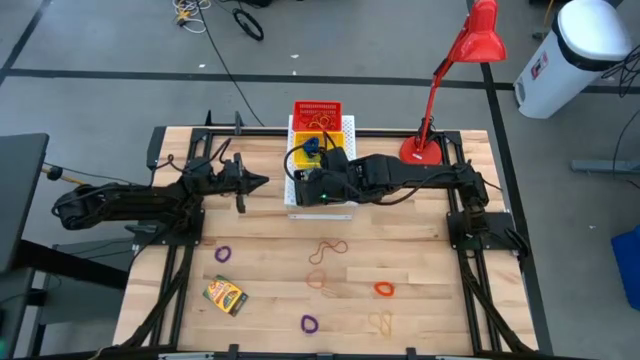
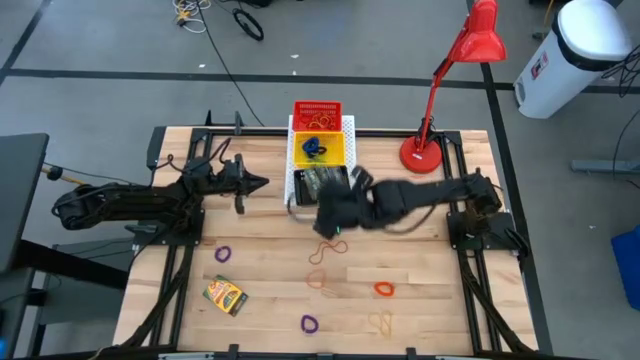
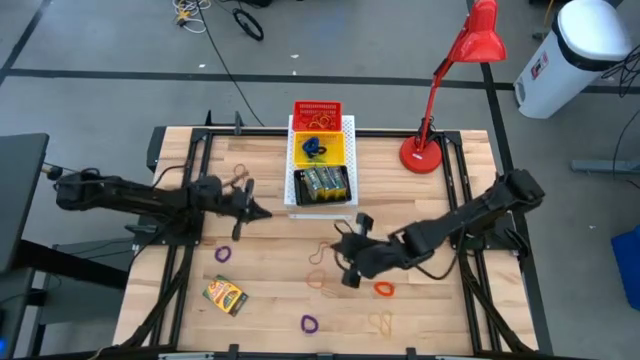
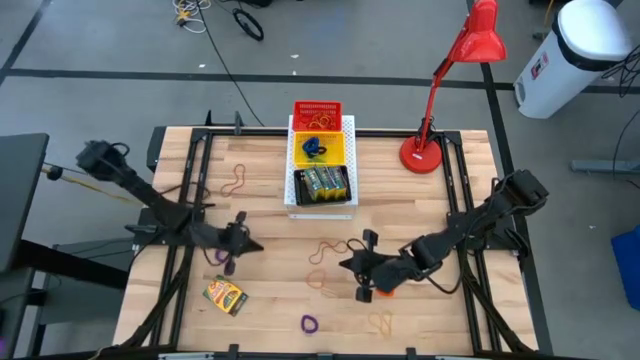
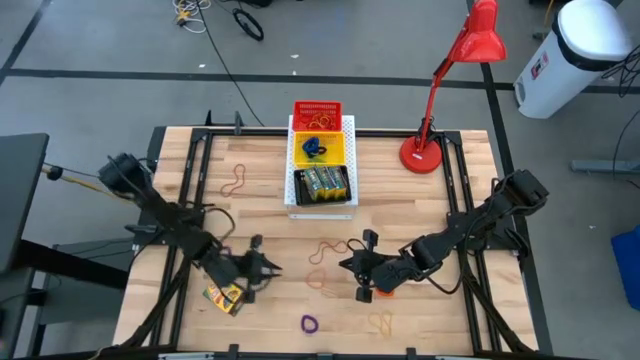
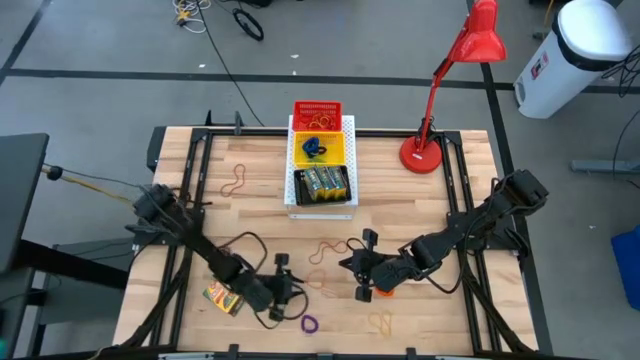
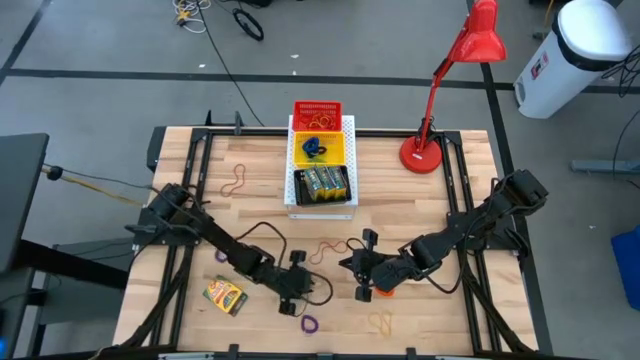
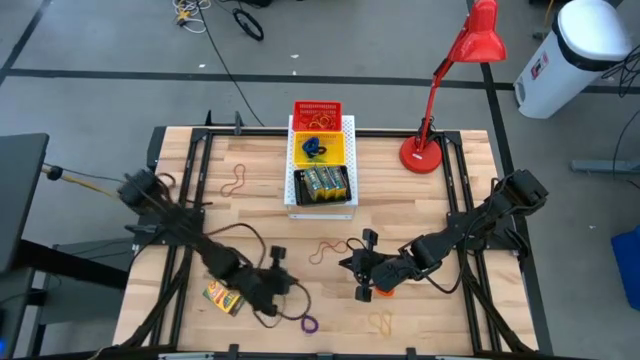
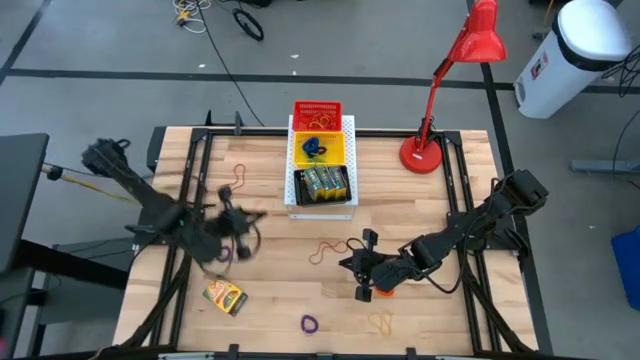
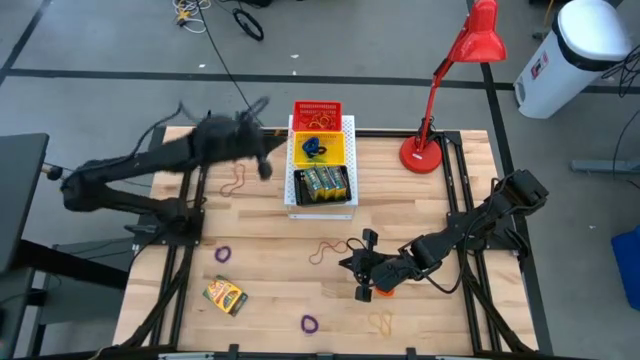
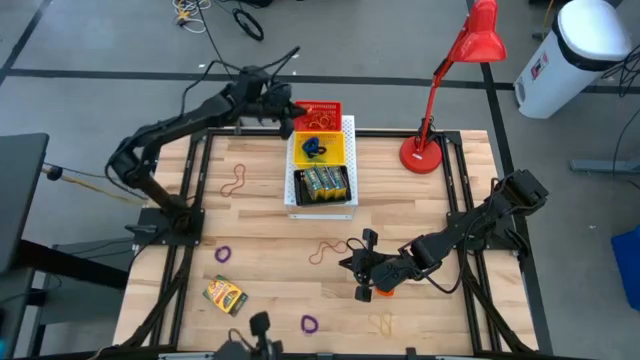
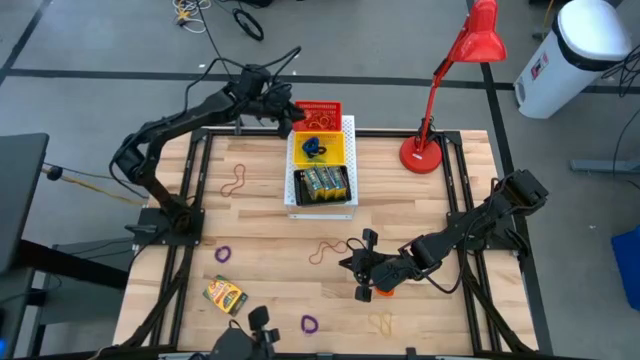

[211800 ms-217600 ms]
Task: Pick & Place Office Desk Supplies
Put the orange rubber band into the red bin on the shelf

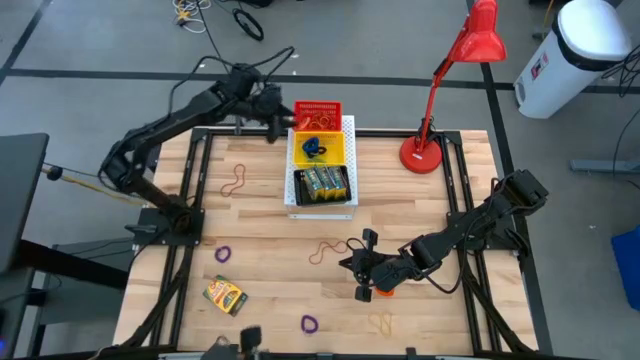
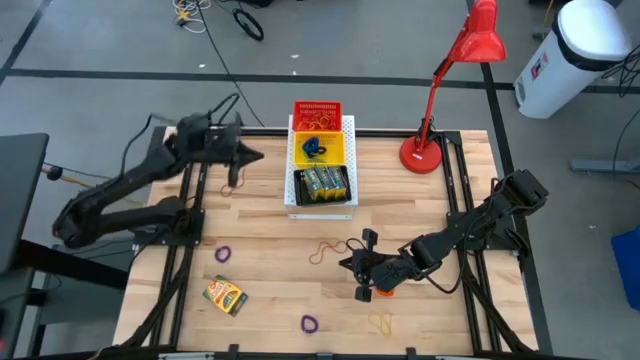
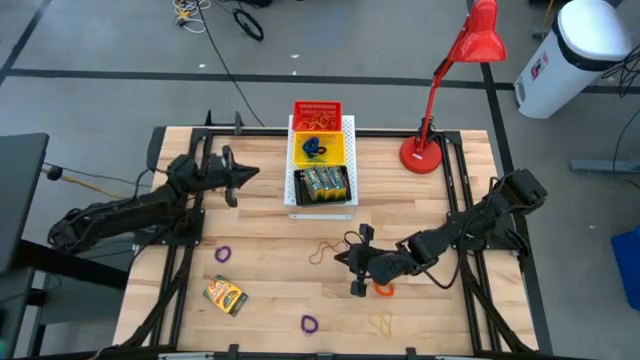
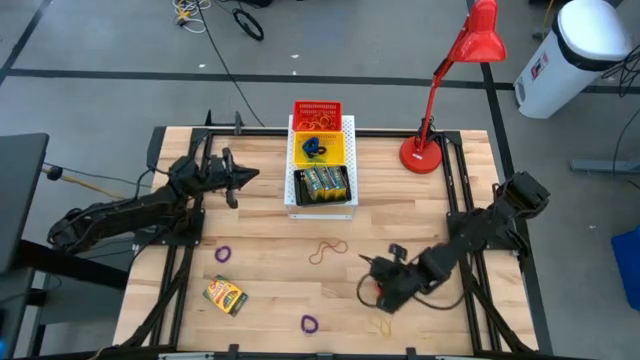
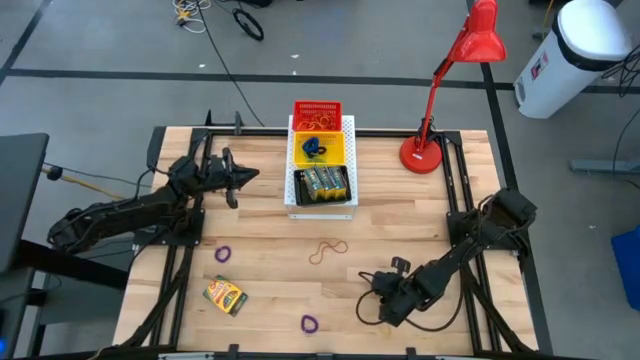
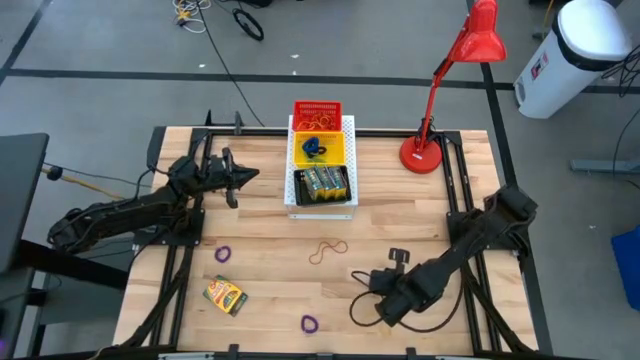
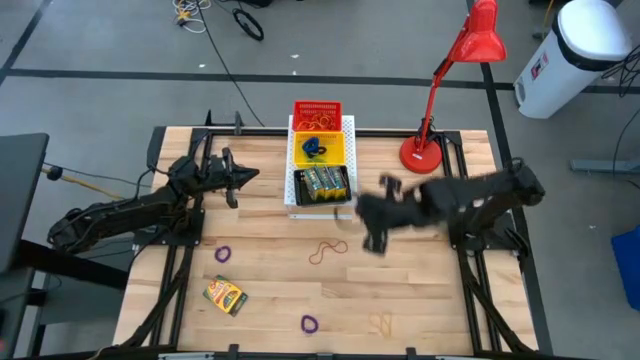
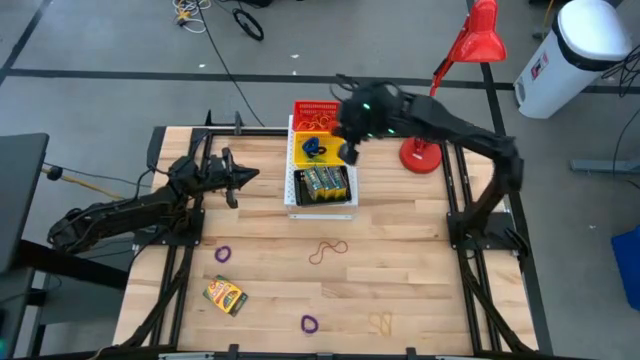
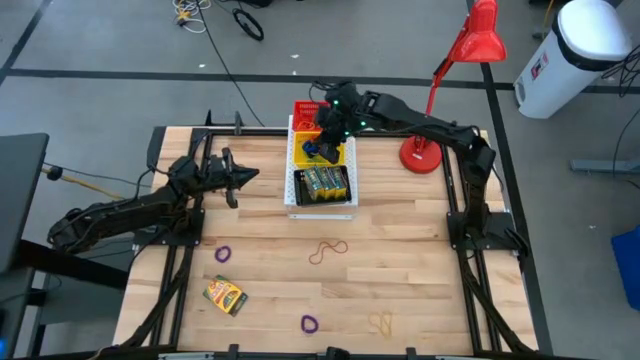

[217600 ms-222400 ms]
Put the orange spring keychain into the yellow bin on the shelf

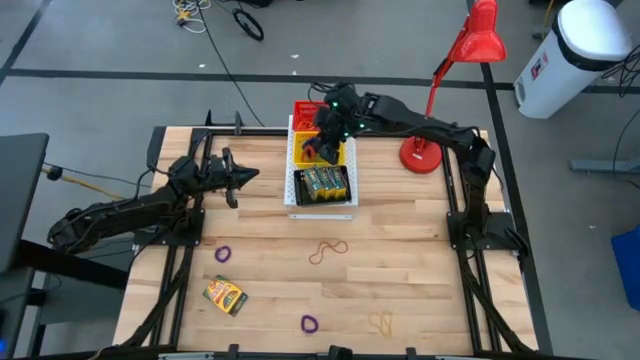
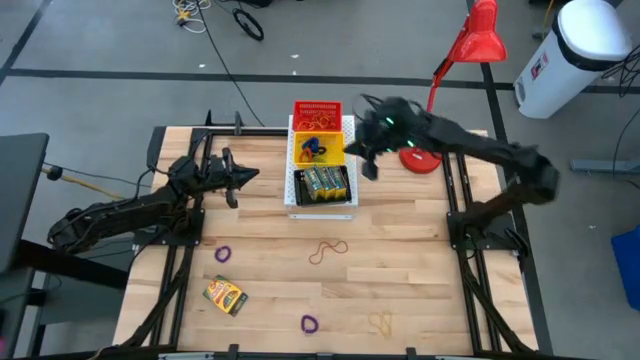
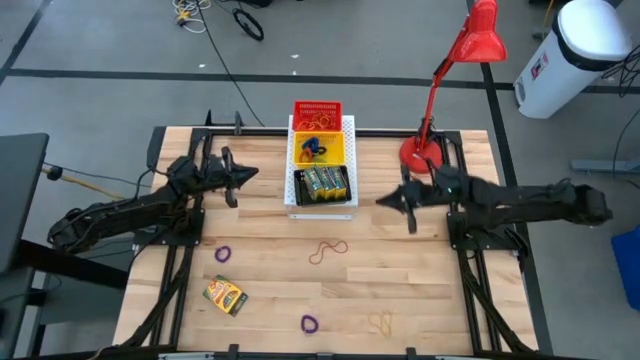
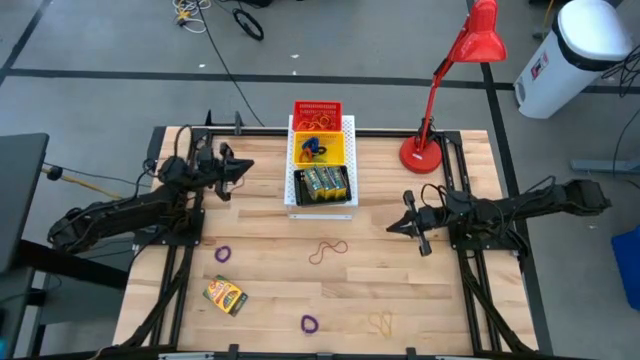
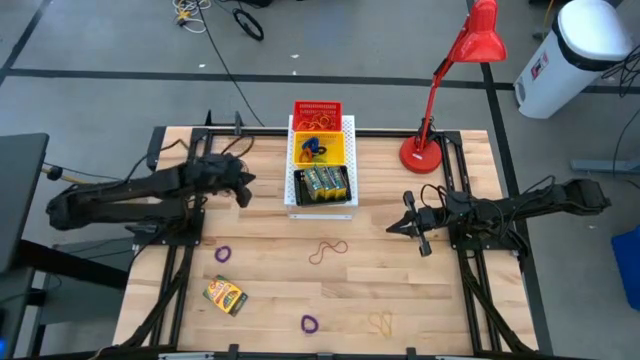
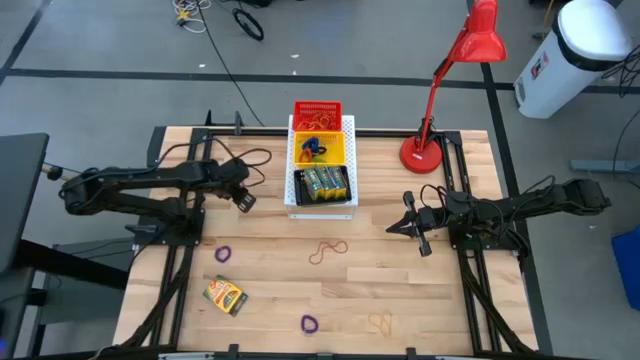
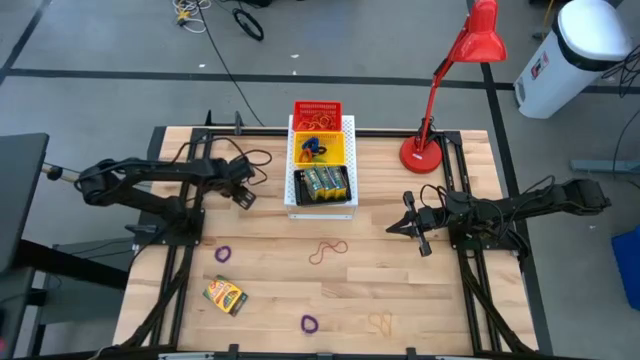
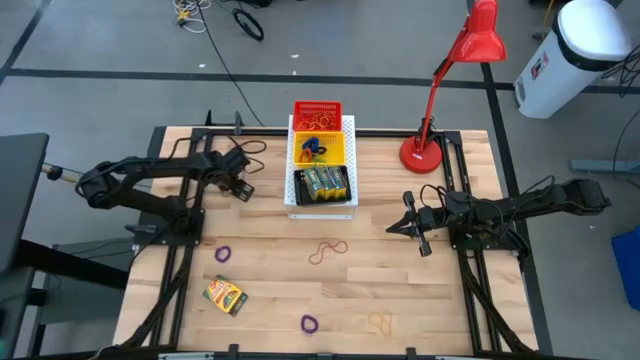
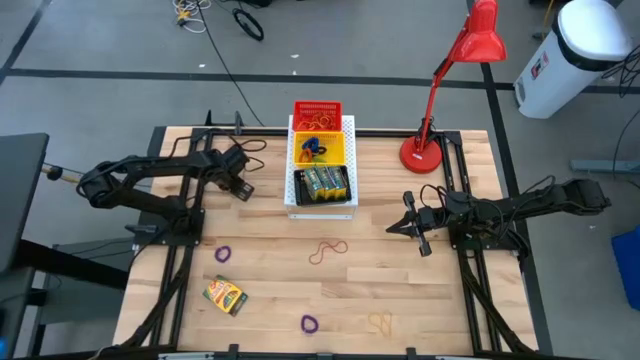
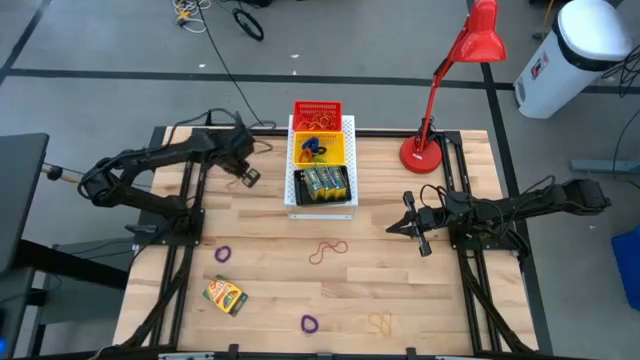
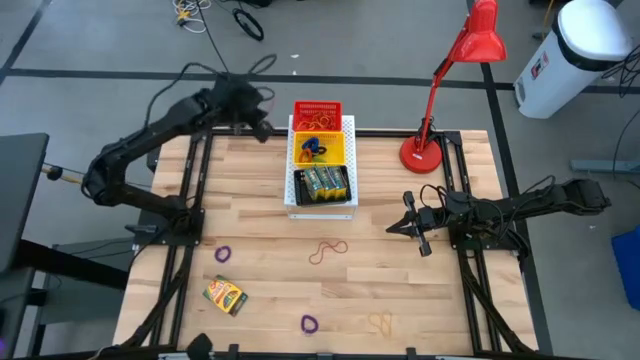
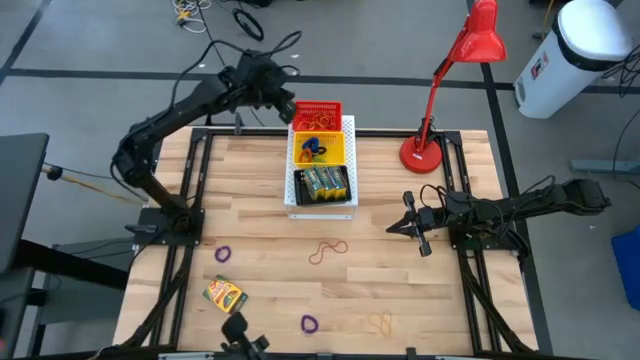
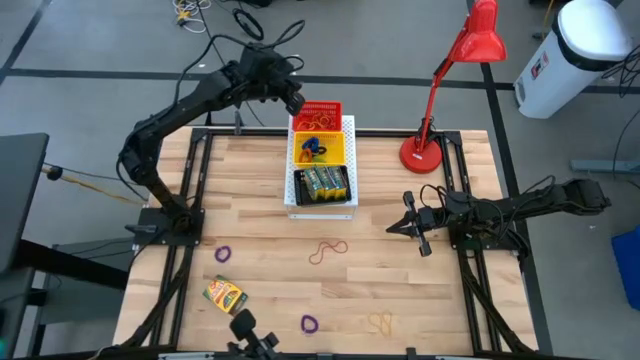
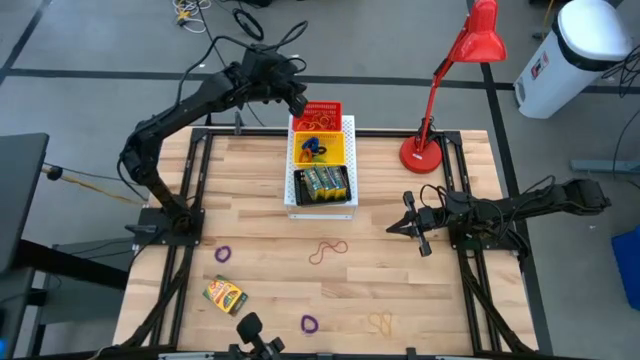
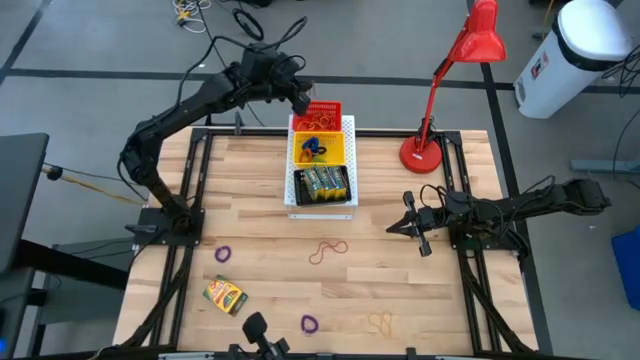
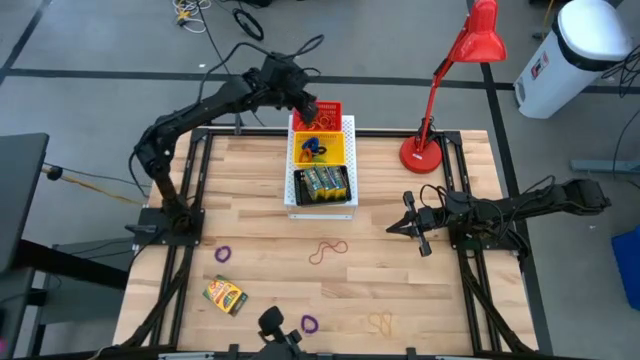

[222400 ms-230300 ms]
Put the red rubber band into the red bin on the shelf

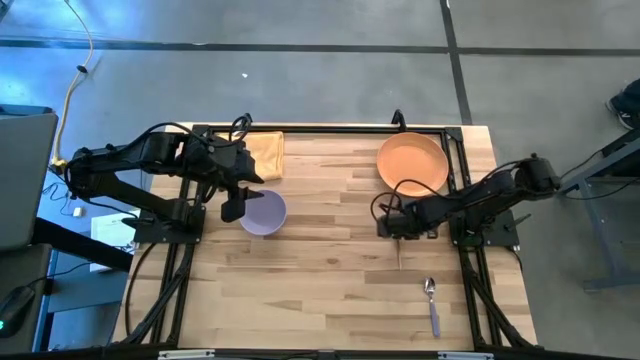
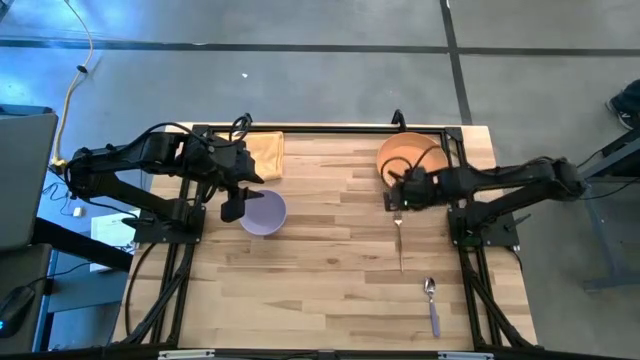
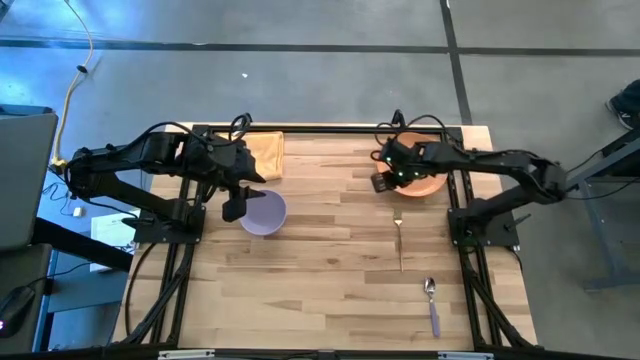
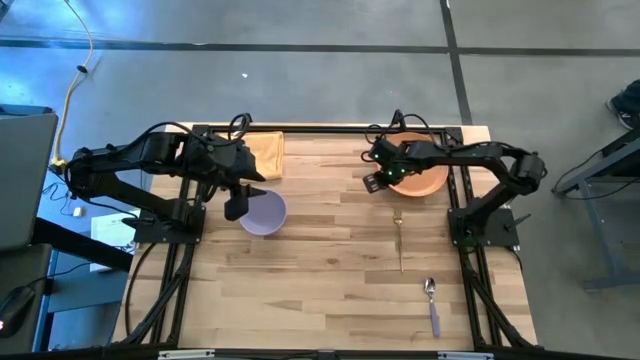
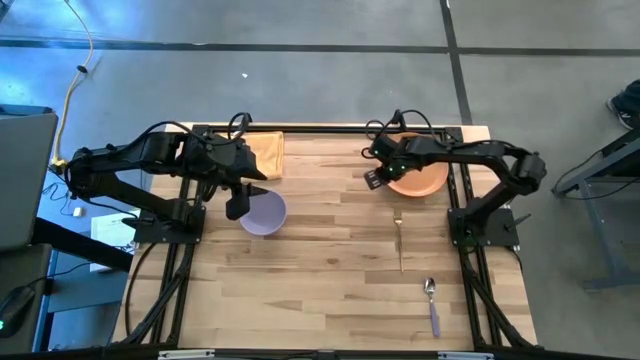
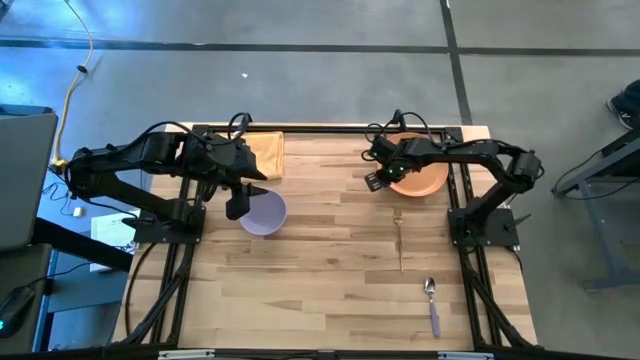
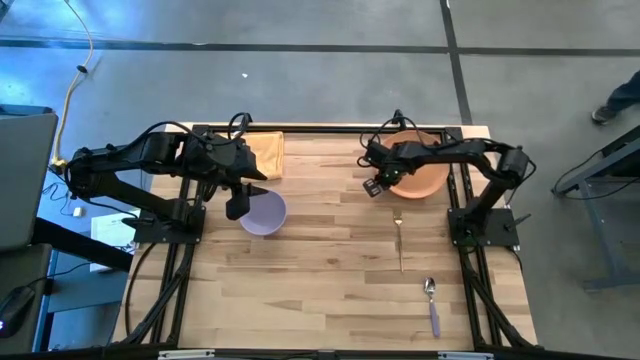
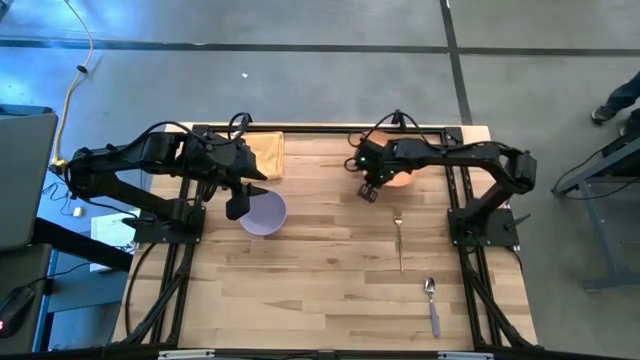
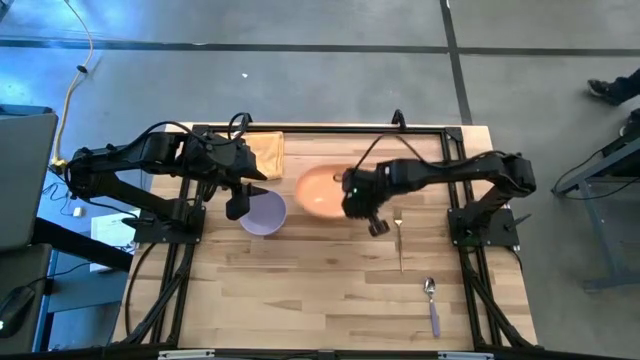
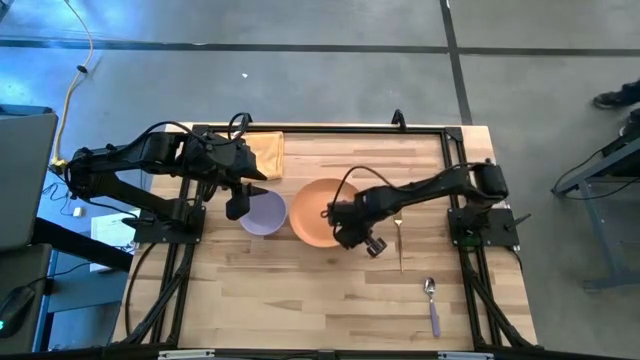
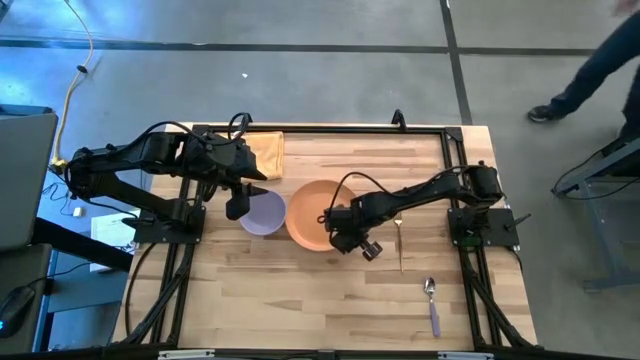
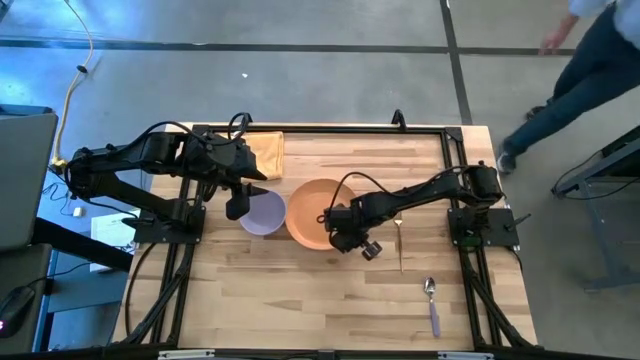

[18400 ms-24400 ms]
Task: Set table place
Move the orange plate between the purple bowl and gold fork on the table
